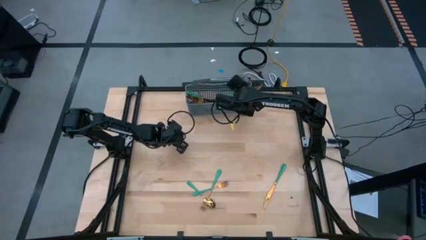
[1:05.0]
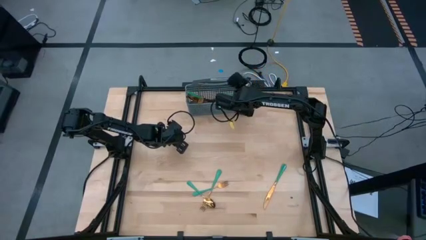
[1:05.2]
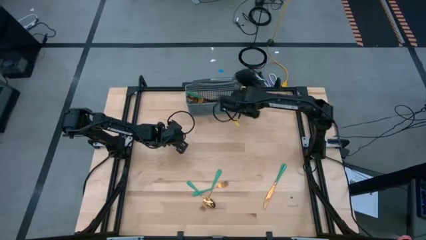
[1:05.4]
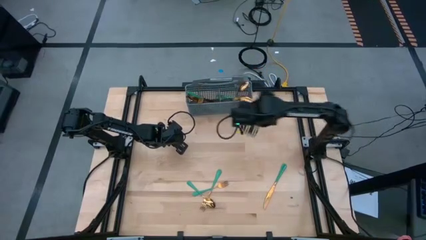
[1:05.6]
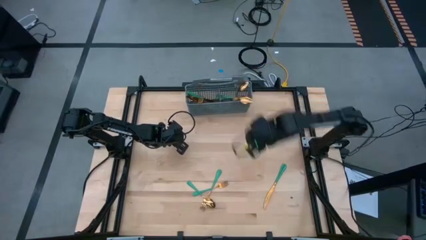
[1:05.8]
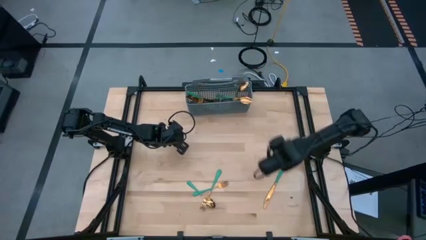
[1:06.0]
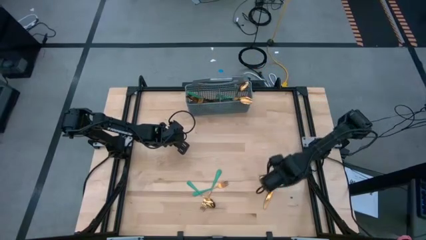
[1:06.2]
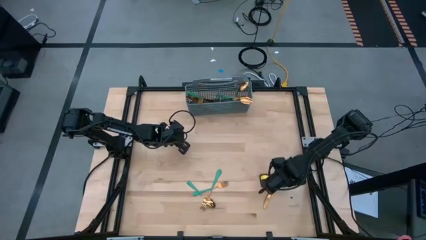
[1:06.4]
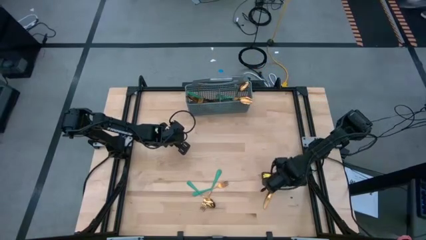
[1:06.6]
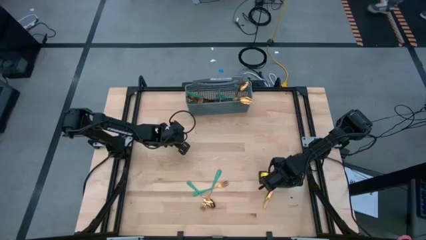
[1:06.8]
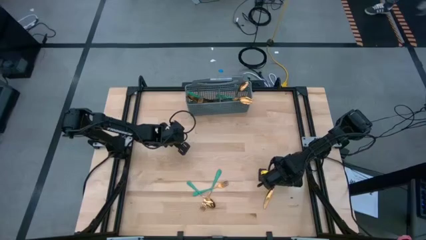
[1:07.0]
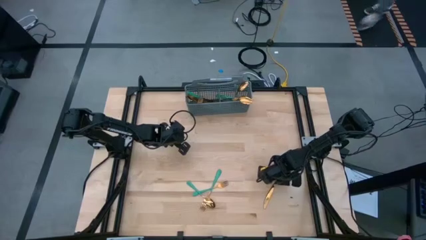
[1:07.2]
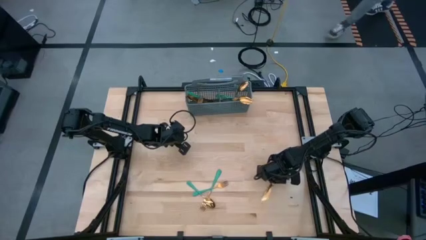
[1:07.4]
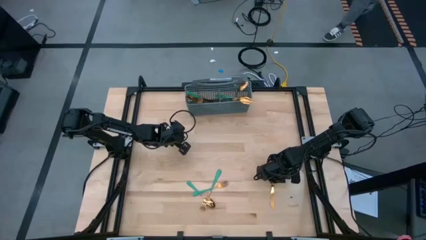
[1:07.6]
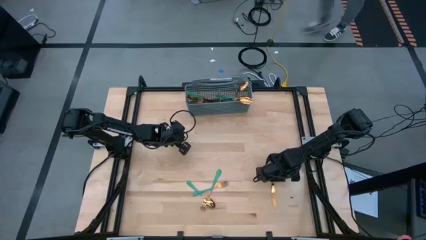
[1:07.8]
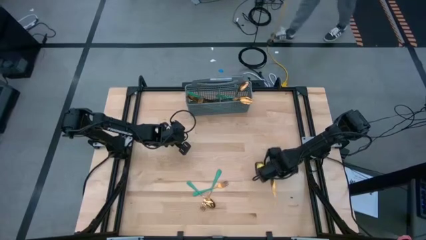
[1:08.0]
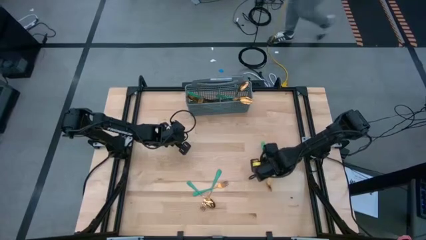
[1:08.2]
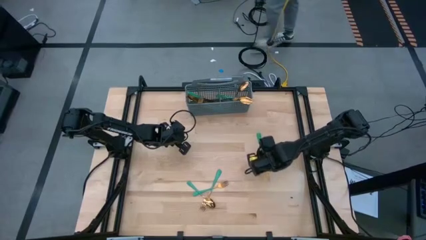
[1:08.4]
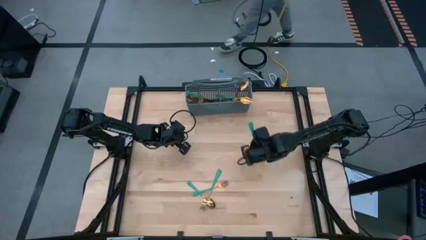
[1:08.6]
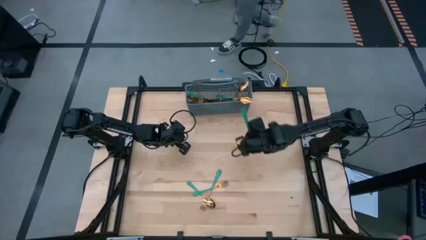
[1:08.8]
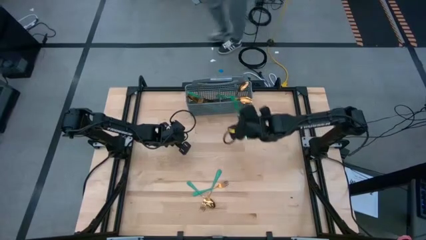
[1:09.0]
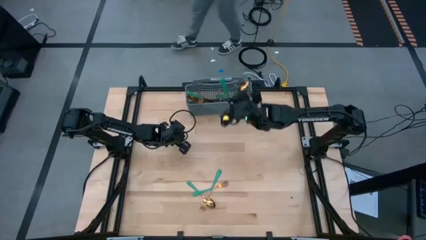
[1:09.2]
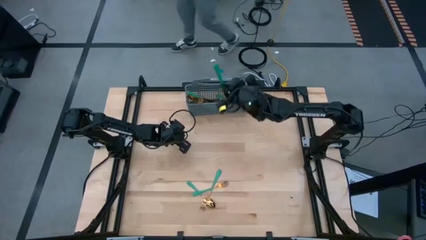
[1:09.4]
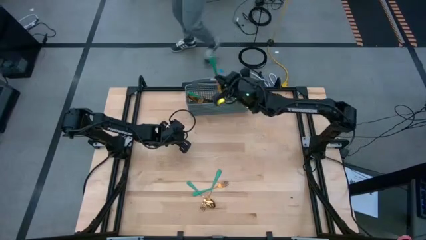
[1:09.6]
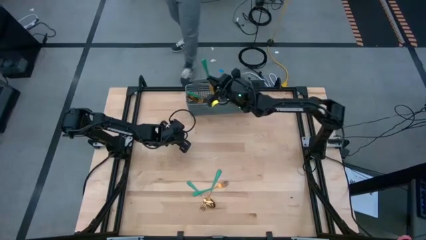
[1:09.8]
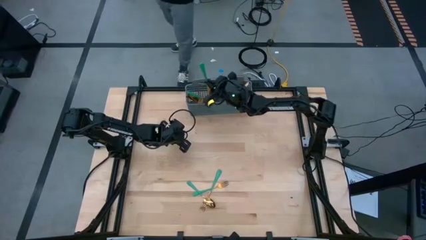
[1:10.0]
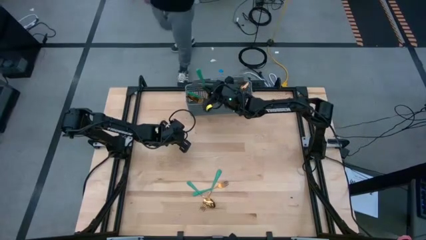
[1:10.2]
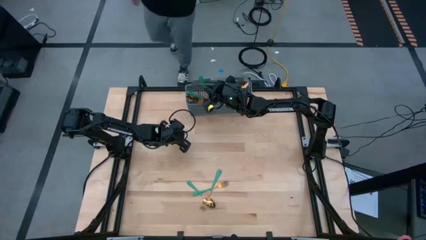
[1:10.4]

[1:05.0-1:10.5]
Task: Sort silverware
Put the gold knife into the middle left section of the gray utensil holder

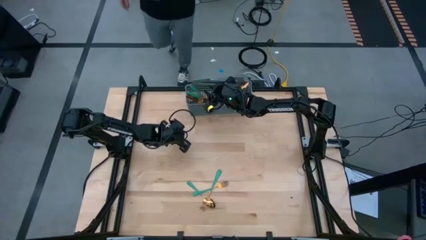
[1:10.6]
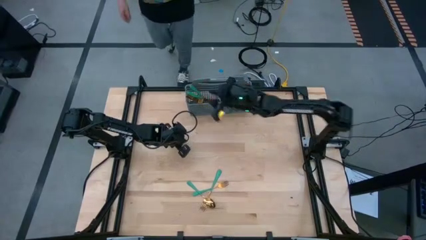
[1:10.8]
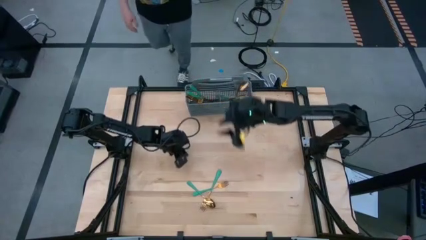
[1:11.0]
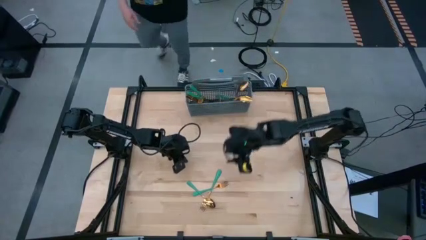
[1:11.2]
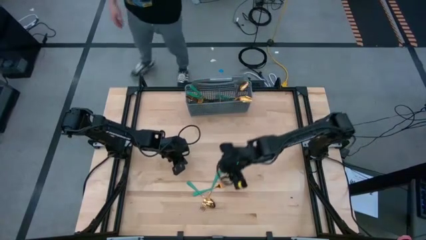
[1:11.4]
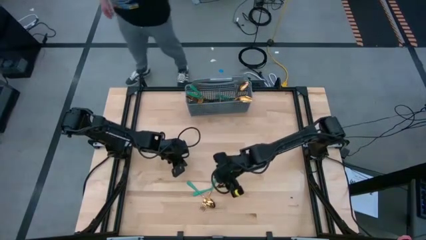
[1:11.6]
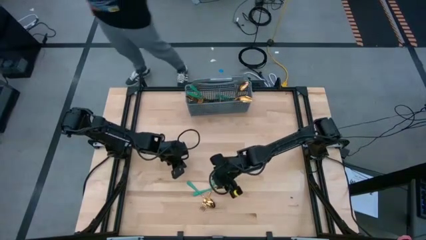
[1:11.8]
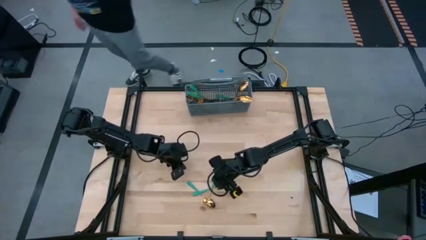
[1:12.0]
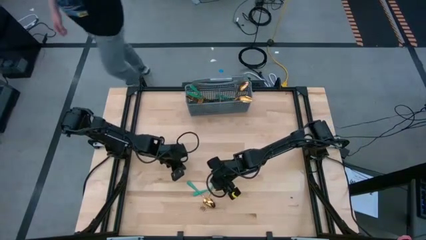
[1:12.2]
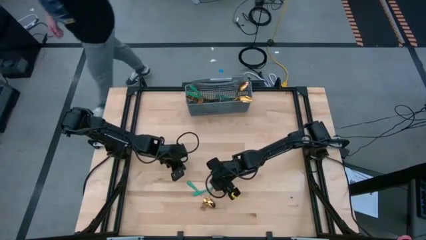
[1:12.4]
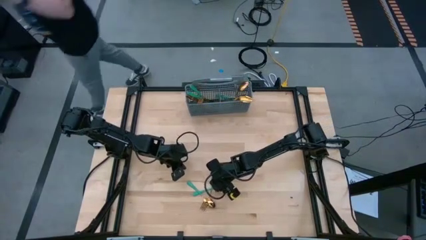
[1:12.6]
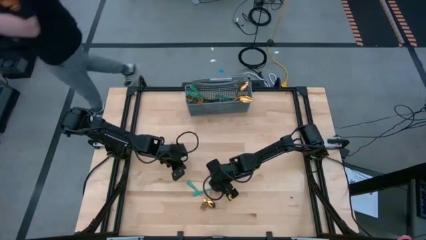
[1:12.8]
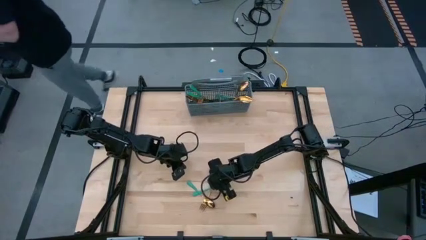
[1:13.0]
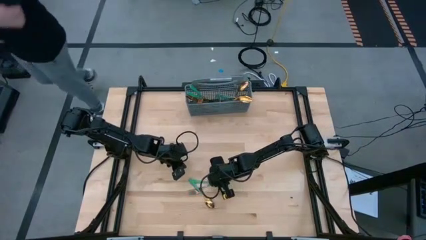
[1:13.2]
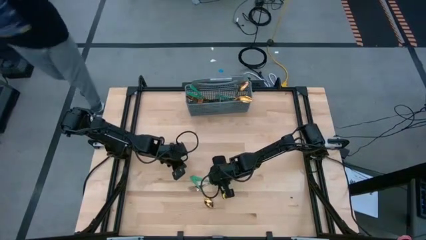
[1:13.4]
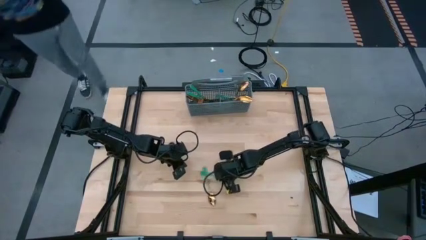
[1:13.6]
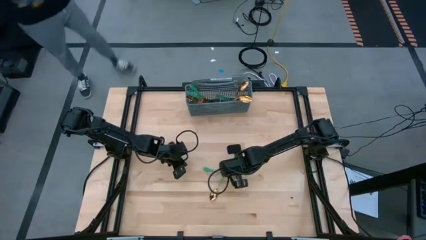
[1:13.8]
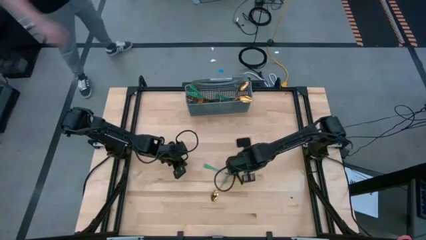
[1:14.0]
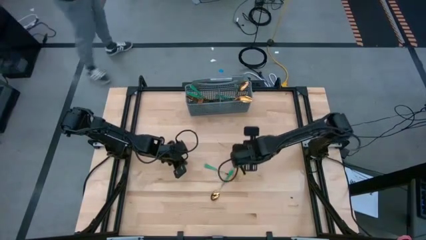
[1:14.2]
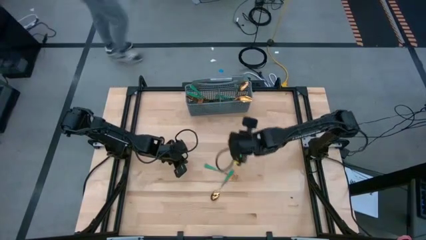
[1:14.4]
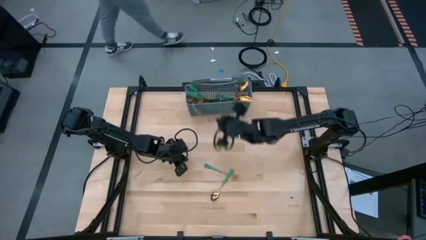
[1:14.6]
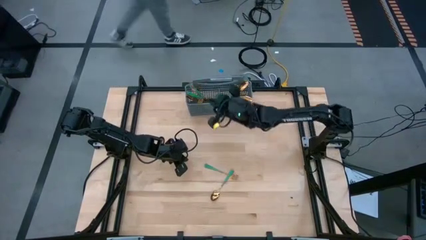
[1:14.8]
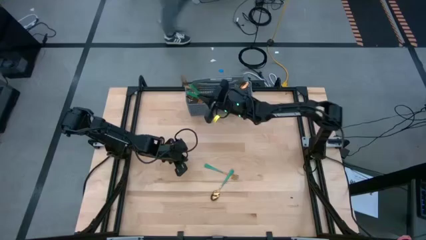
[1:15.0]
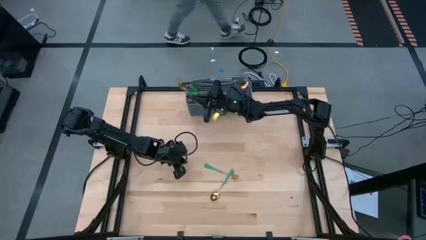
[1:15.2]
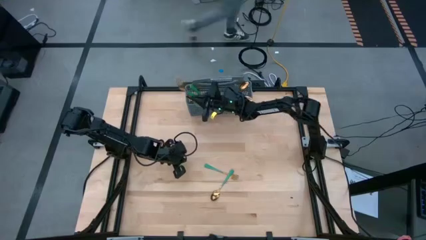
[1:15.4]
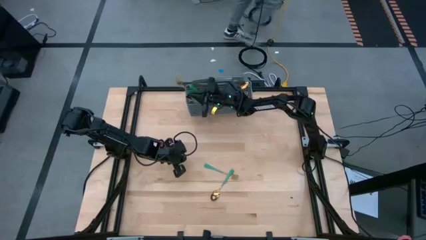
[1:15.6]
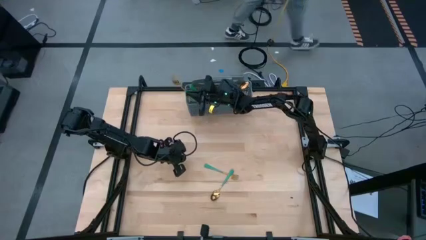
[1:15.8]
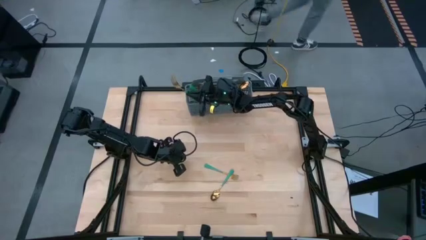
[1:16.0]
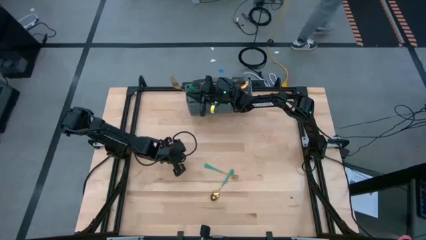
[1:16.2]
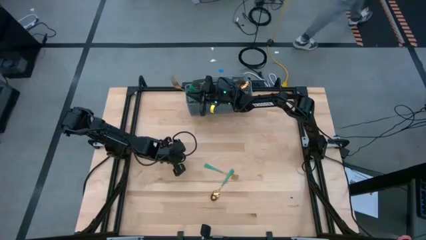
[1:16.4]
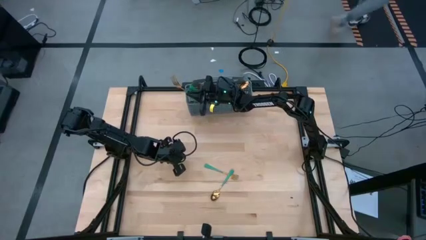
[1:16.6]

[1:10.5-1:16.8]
Put the gold fork into the left section of the gray utensil holder

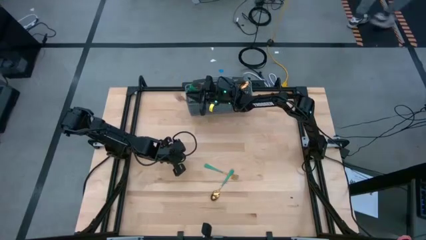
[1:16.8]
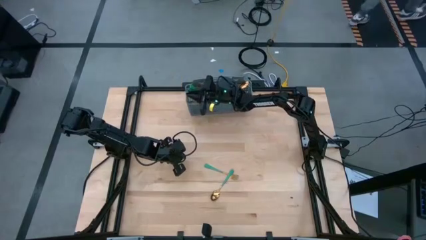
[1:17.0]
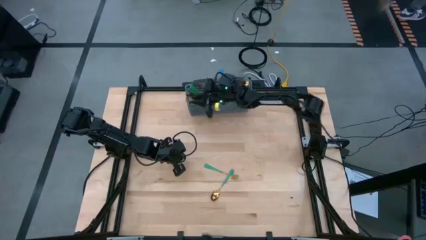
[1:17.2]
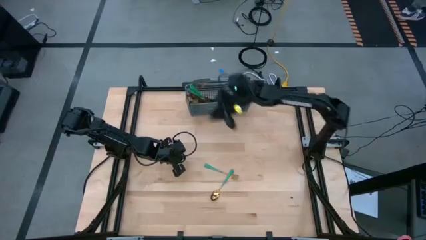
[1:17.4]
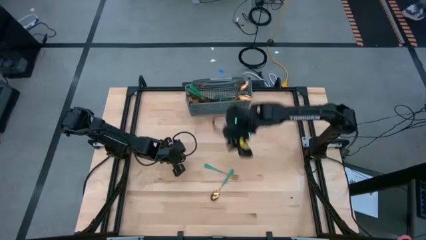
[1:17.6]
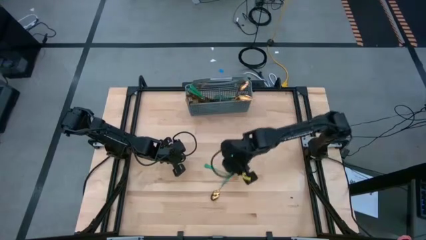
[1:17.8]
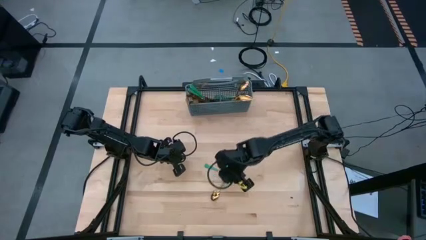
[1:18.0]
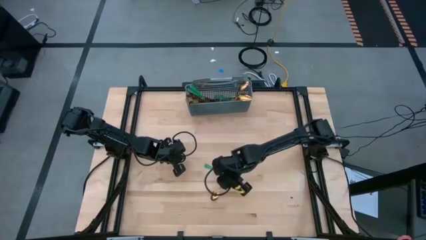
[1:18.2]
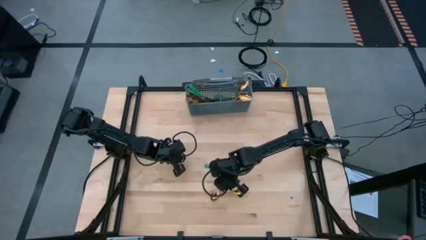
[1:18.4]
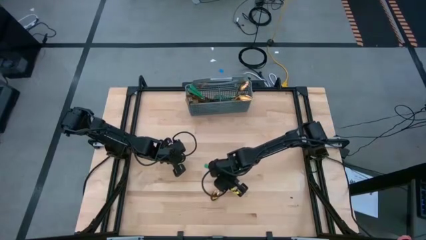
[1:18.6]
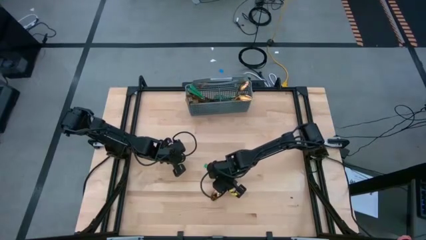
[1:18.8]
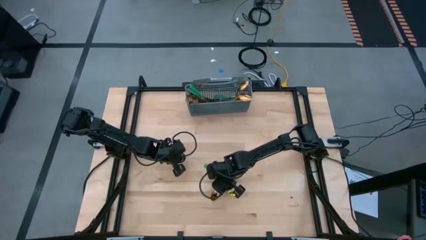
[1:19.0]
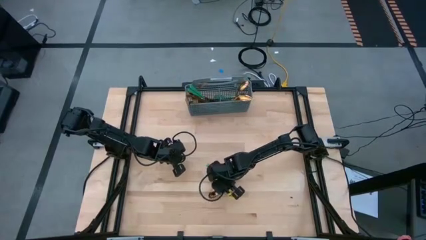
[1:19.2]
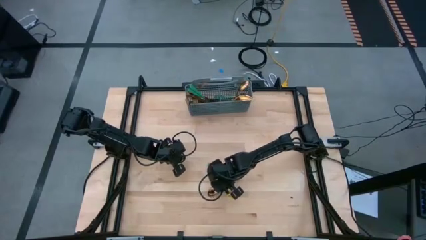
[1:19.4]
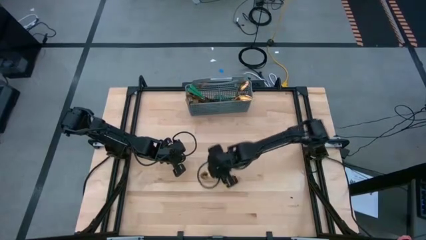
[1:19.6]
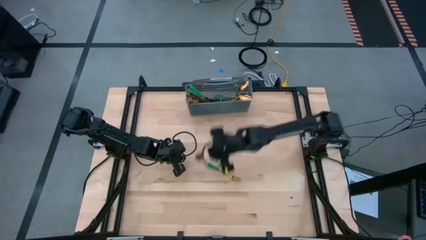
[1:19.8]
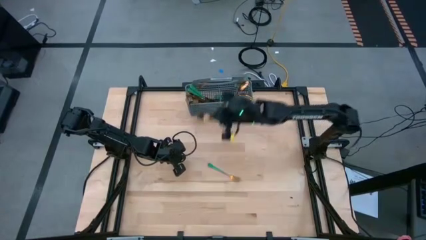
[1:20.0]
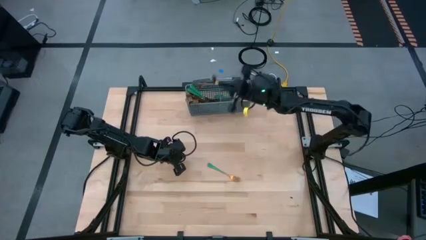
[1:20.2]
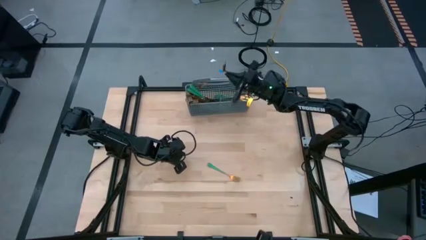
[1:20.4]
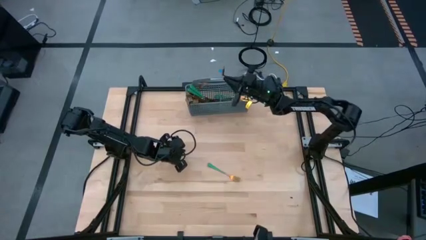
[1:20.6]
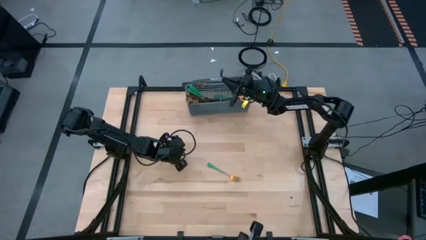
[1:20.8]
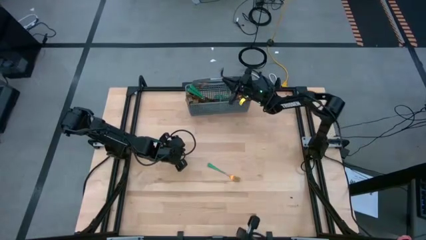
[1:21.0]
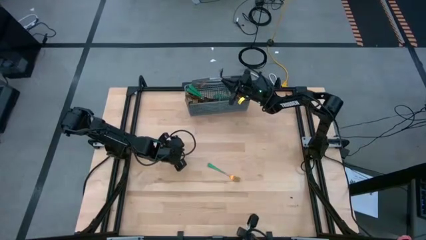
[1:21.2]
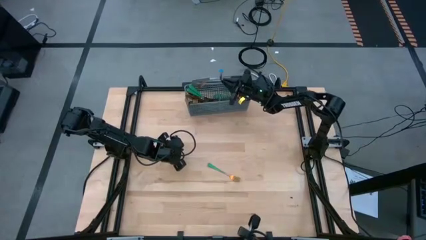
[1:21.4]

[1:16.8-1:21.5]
Put the gold spoon into the middle right section of the gray utensil holder
